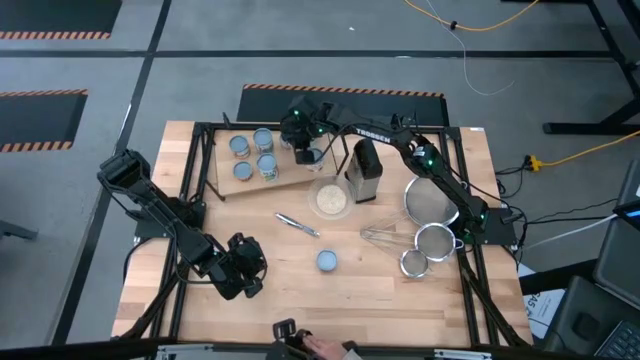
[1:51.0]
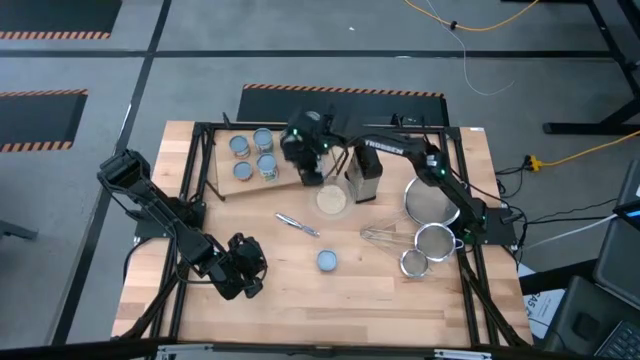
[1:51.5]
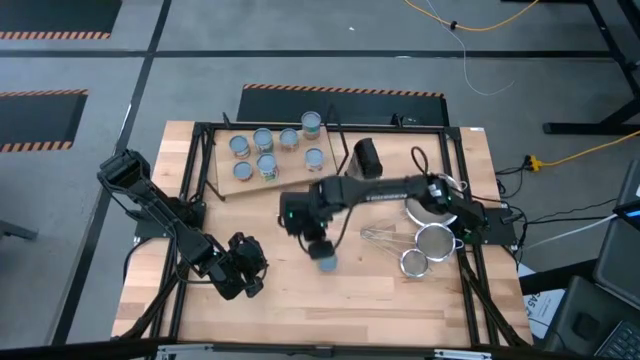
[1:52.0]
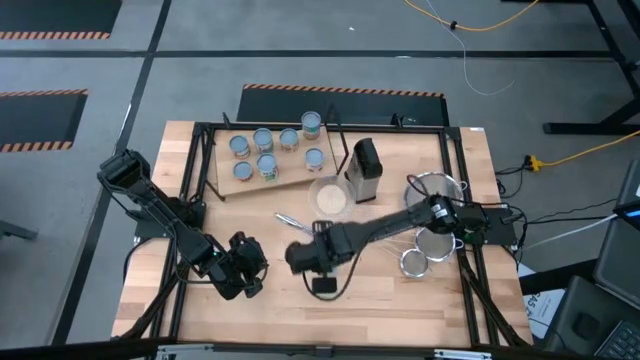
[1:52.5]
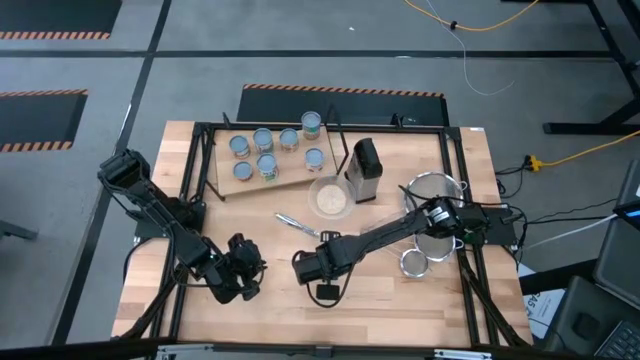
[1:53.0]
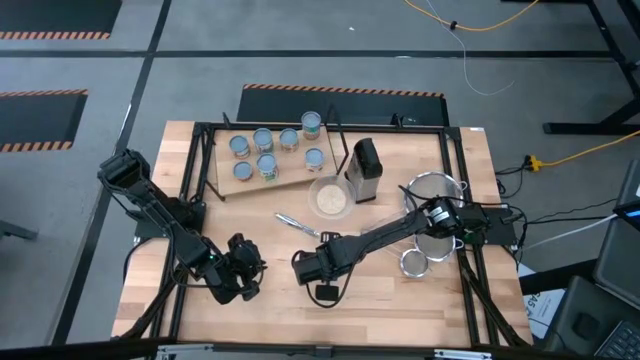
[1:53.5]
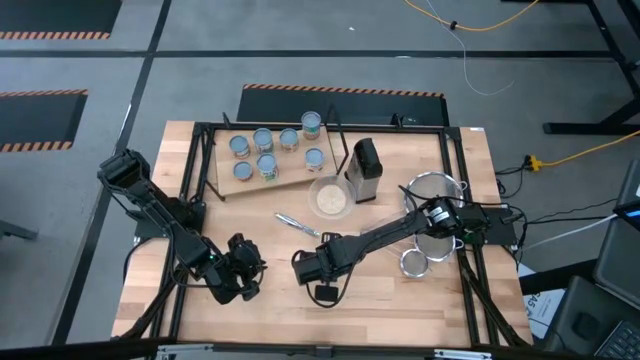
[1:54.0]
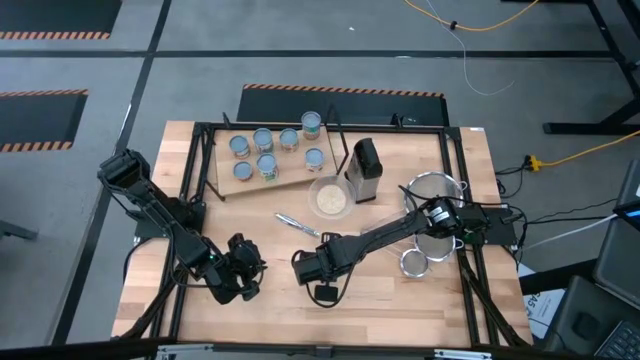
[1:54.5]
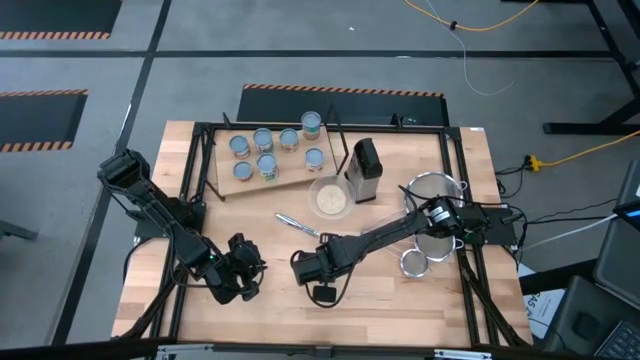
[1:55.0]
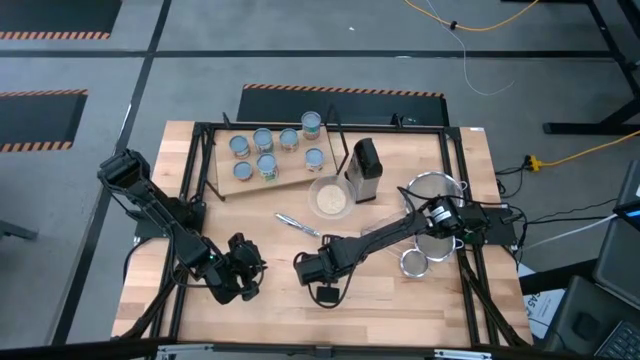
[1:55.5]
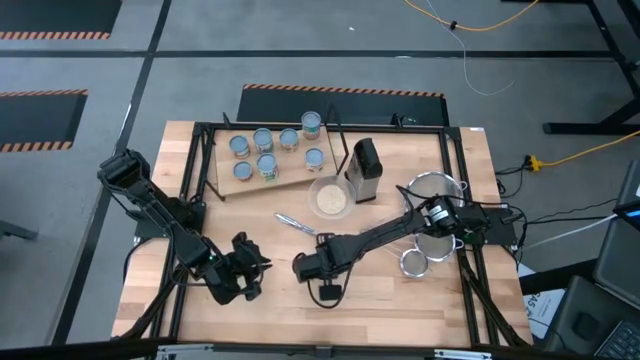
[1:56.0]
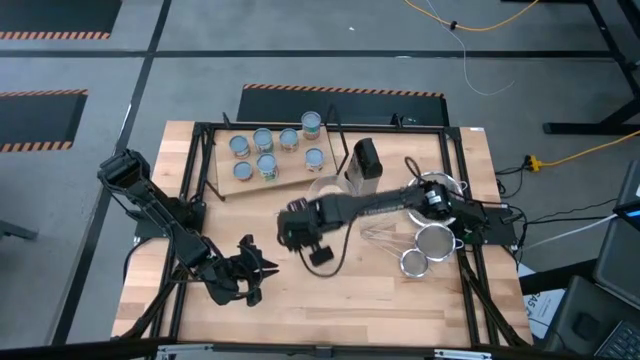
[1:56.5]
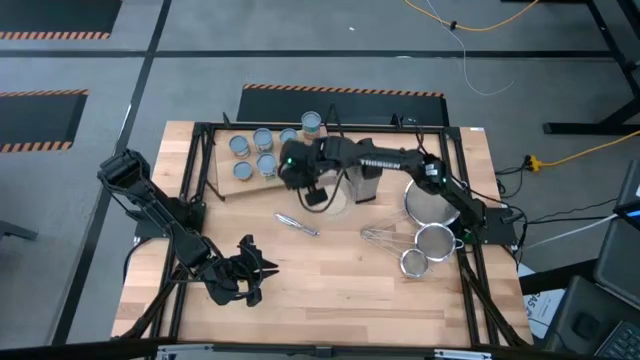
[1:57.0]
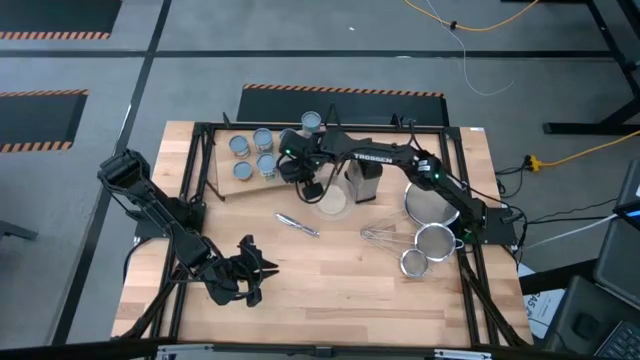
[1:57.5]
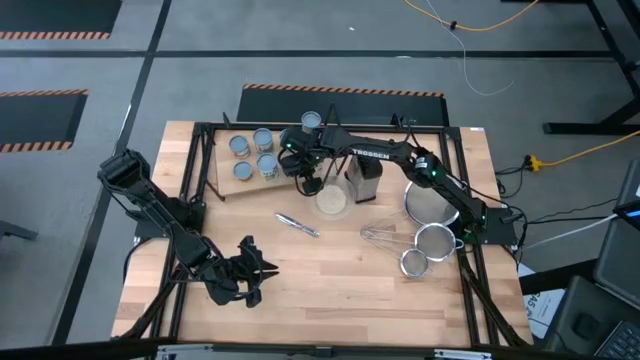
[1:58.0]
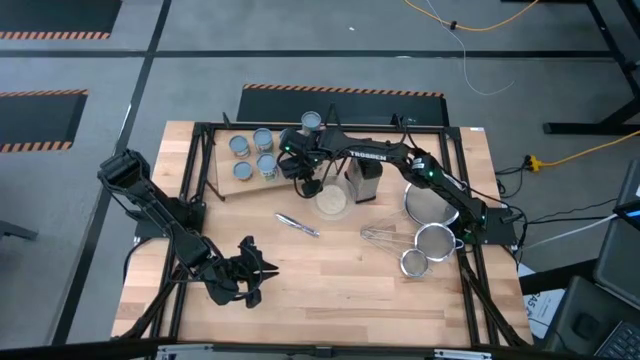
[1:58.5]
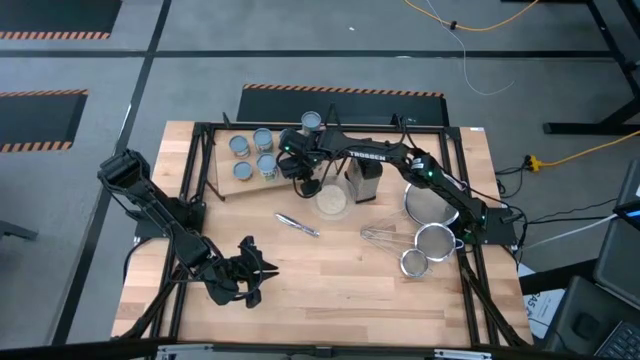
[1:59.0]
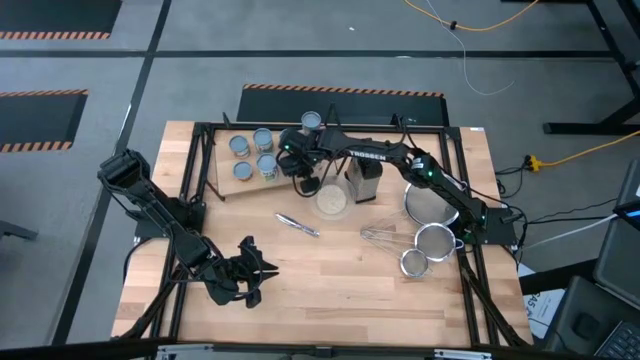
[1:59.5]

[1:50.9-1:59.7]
Task: Pick and place cans onto a shelf
Put the dark green can on the shelf aligned with the other light red can

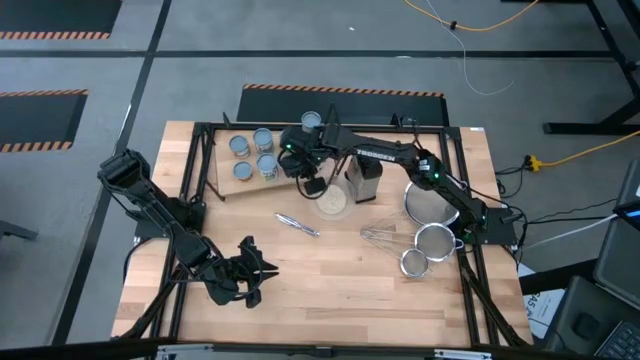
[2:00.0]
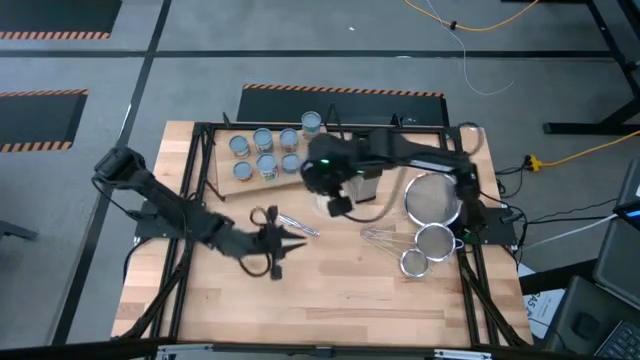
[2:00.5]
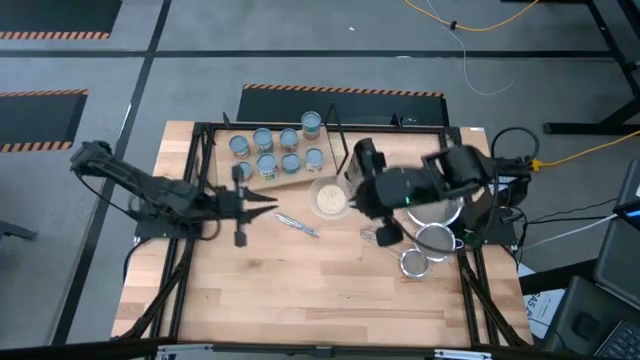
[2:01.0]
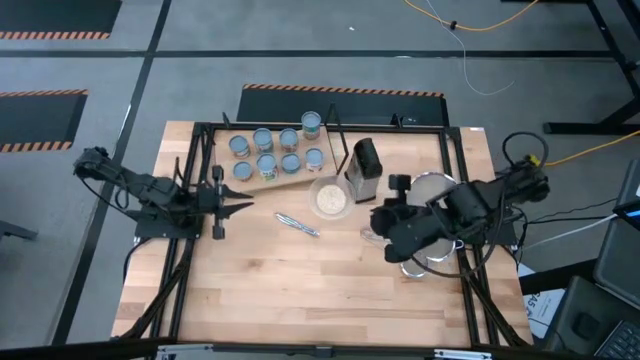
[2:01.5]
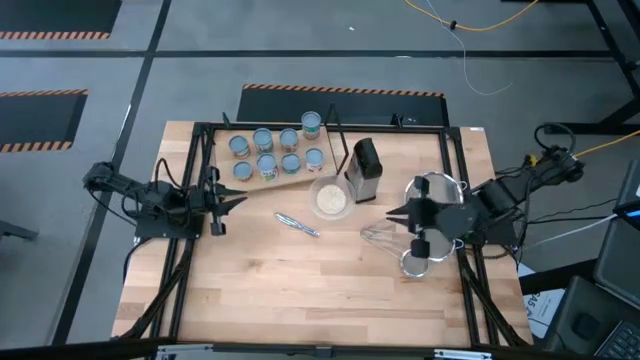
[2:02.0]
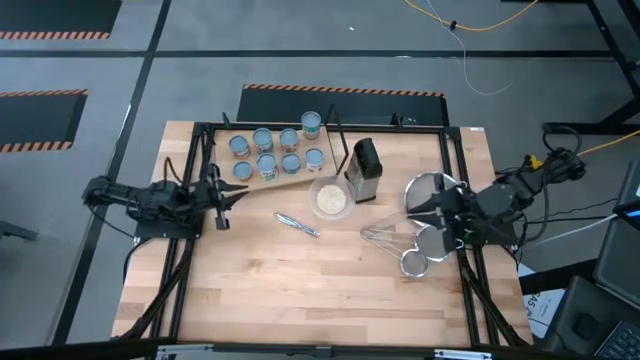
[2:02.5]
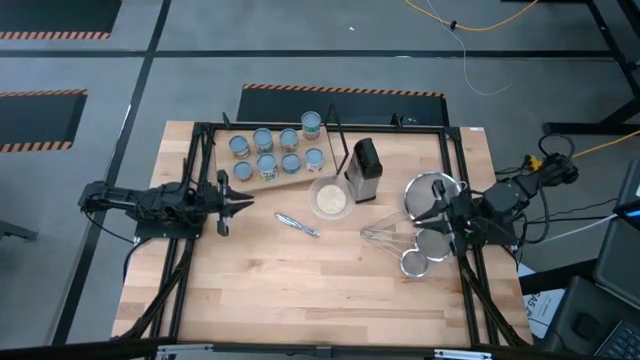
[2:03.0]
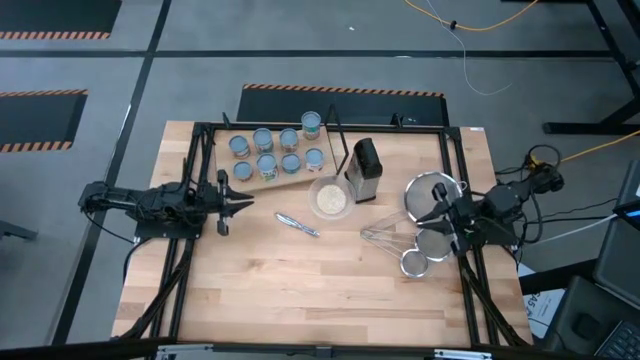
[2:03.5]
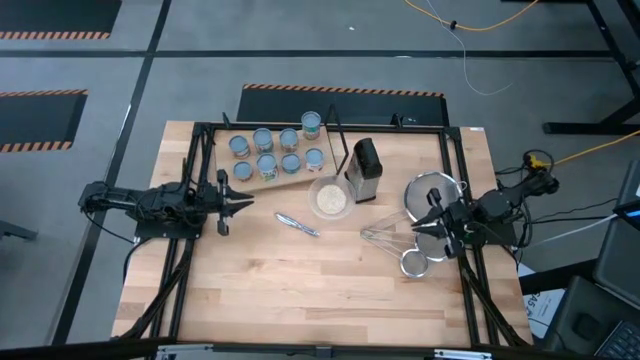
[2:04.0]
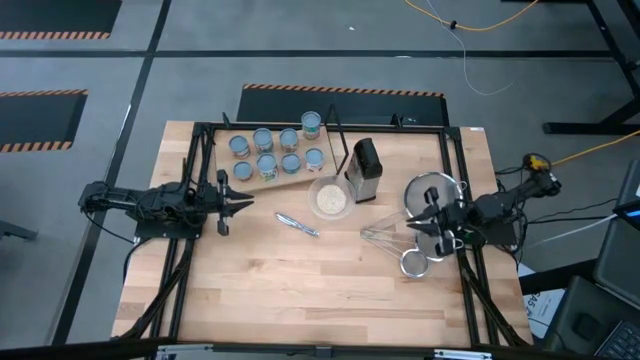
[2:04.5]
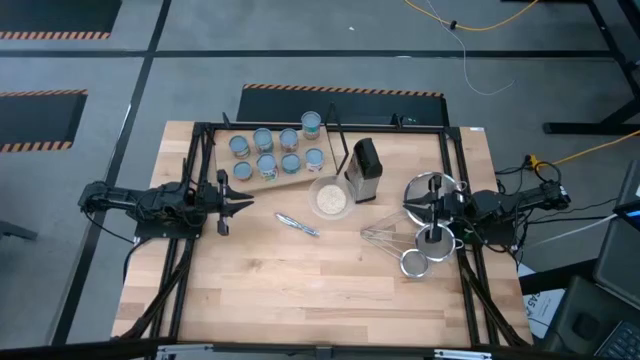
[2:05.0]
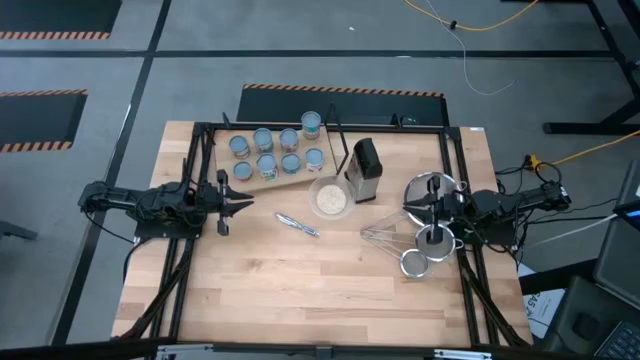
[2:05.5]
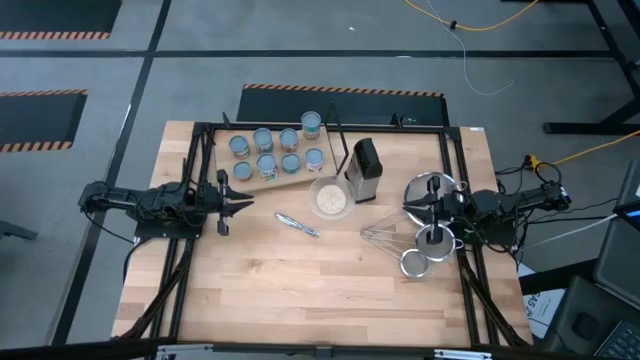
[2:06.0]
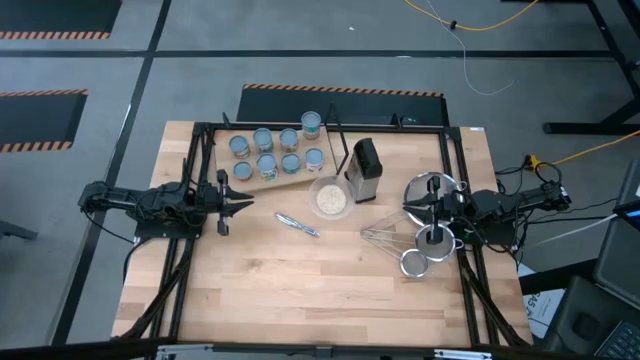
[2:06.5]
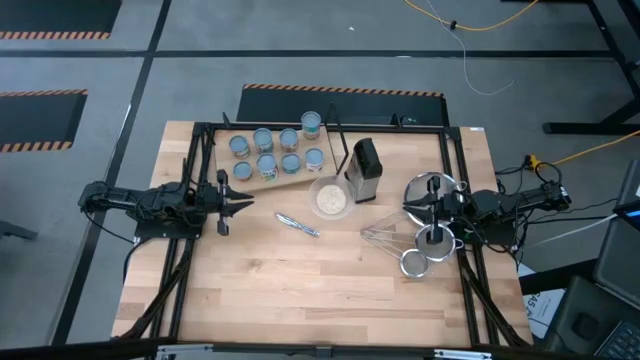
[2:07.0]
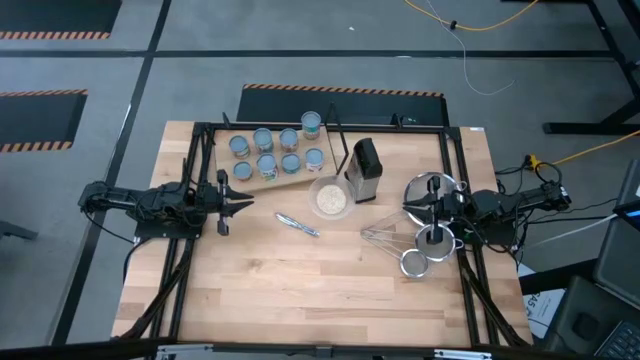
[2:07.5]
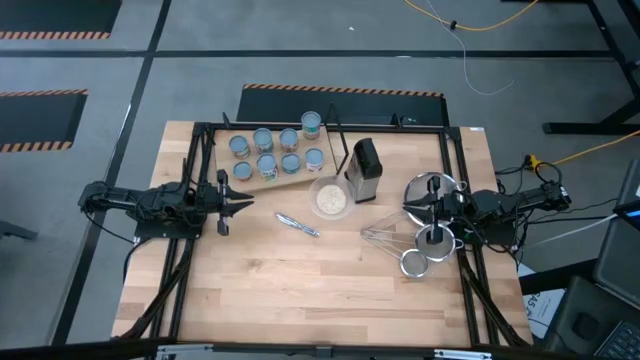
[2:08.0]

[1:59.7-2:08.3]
Return to Home Position

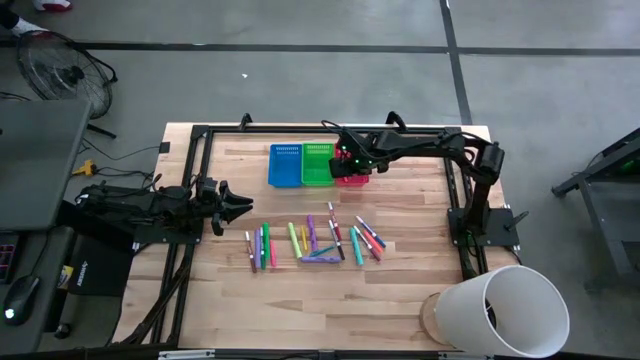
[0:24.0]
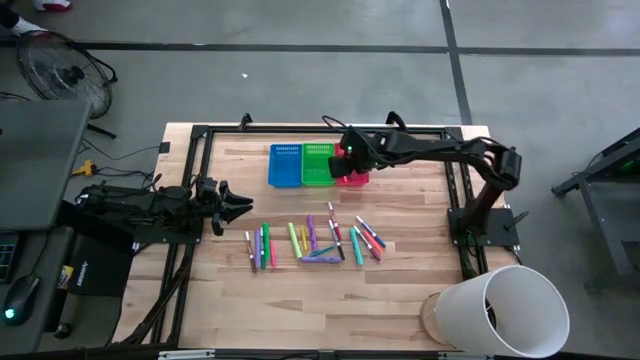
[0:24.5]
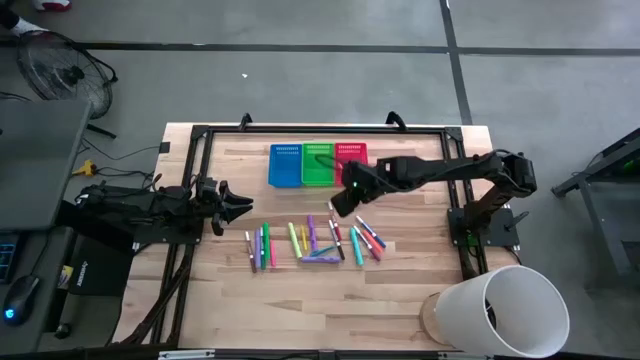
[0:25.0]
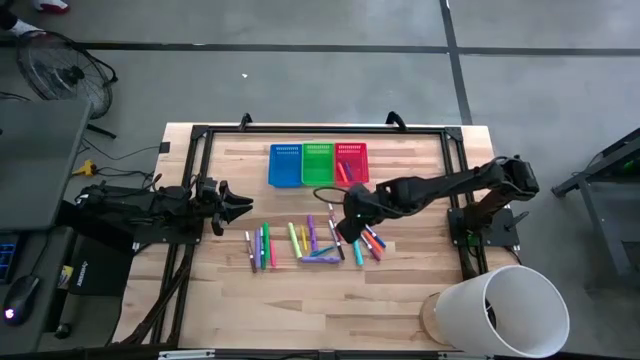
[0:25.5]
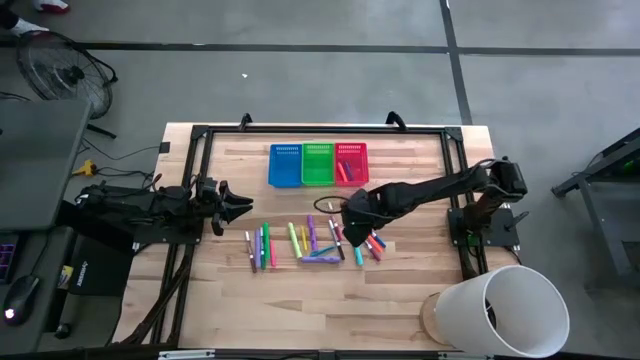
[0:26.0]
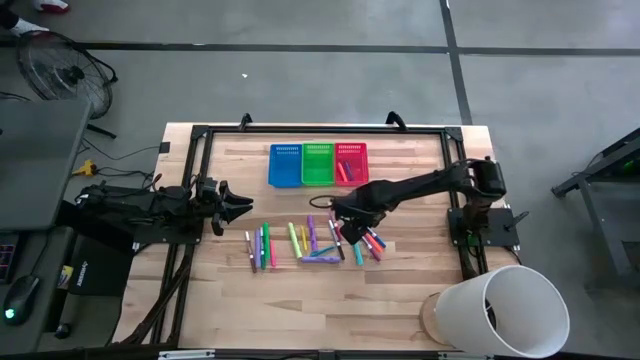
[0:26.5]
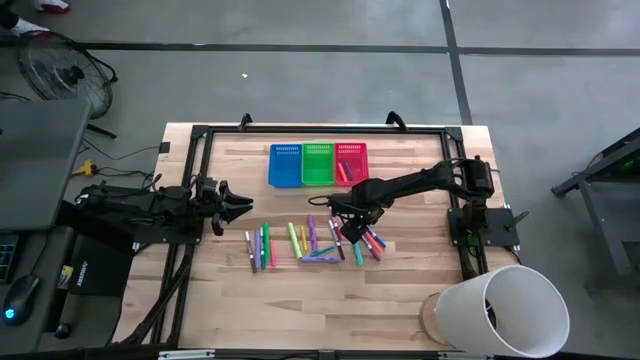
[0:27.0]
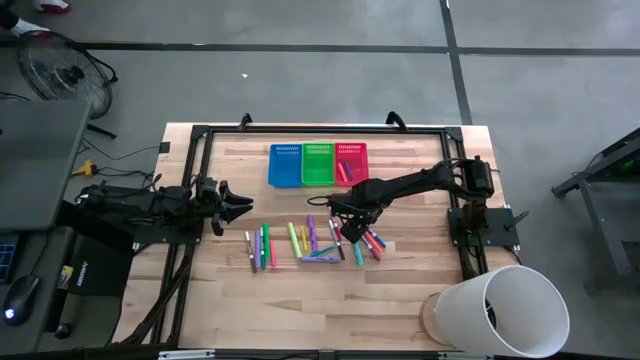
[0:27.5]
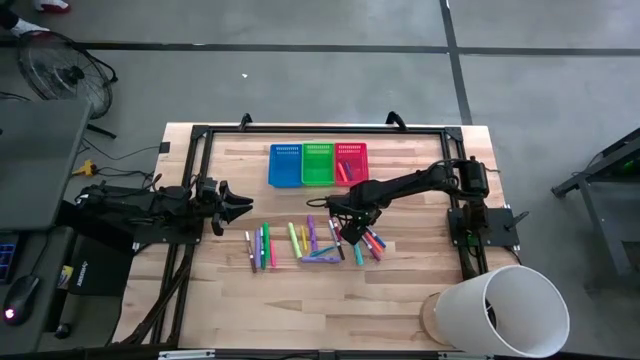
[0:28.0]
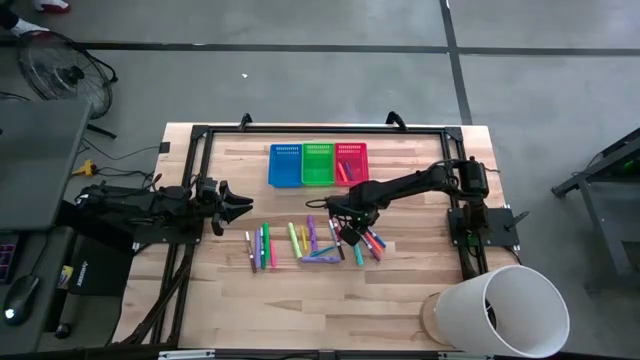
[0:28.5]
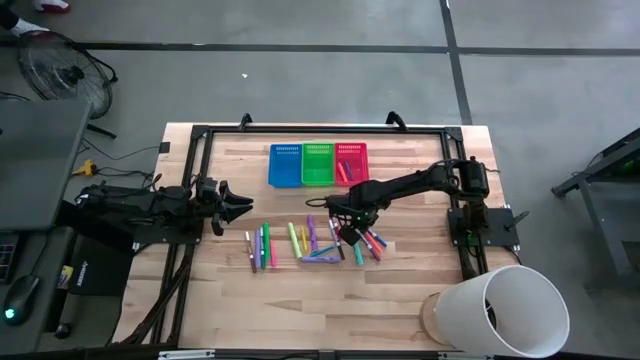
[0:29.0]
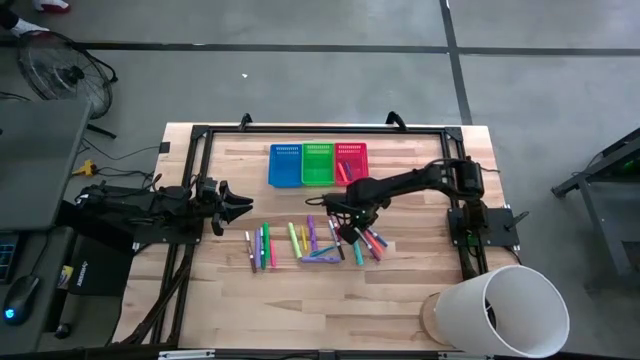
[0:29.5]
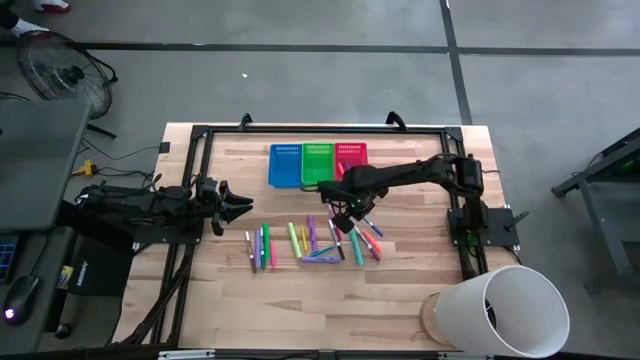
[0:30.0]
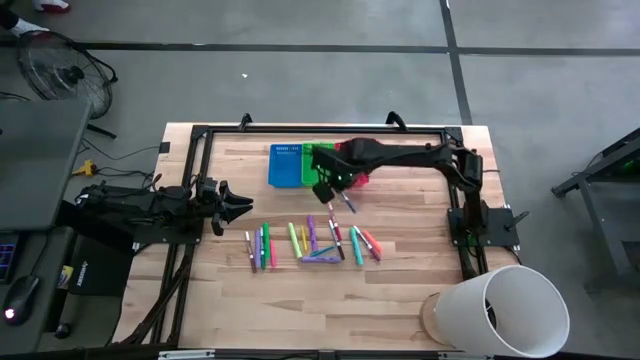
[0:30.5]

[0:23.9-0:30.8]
Task: Pick & Place Markers
Put the blue marker pen into the green bin
